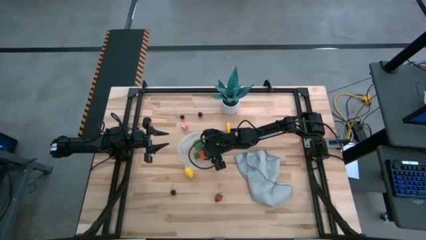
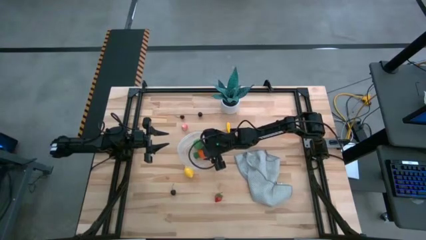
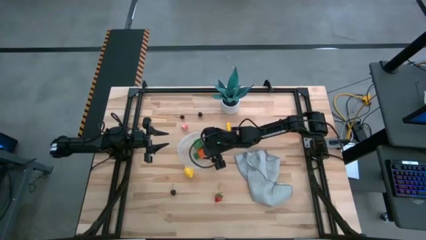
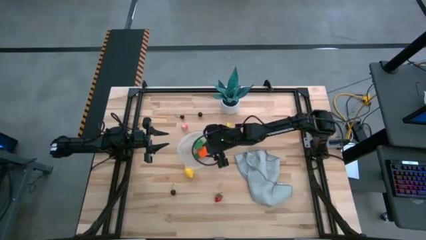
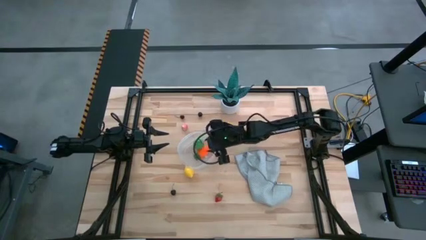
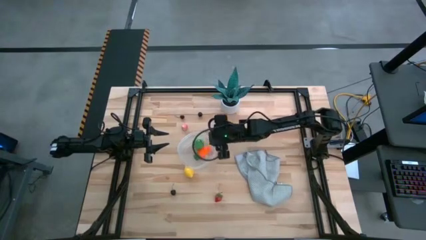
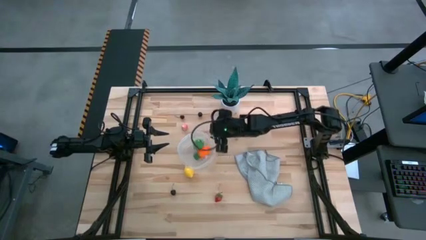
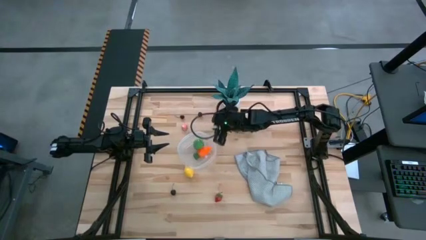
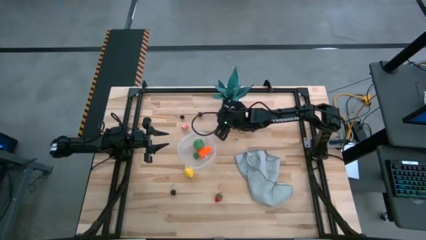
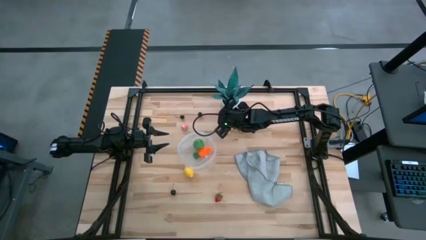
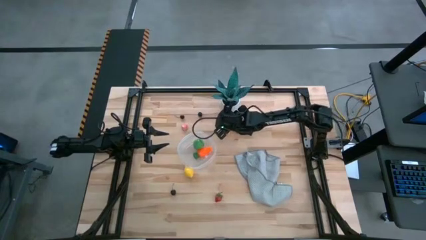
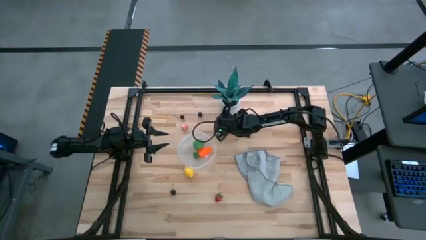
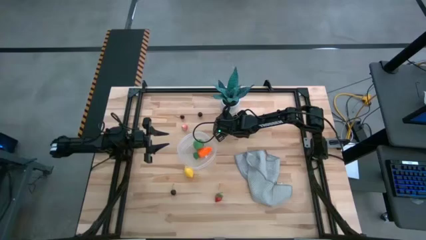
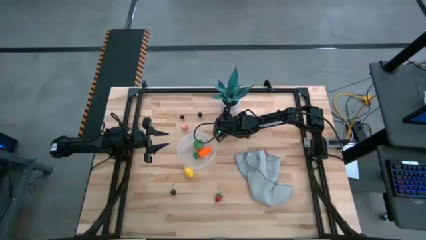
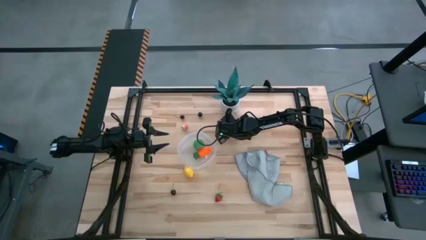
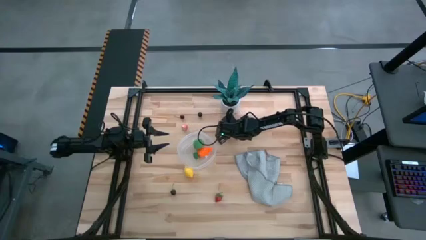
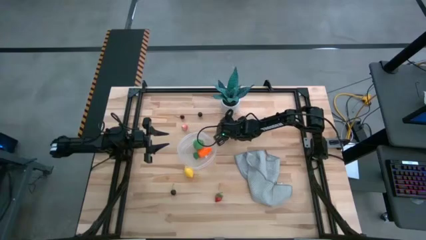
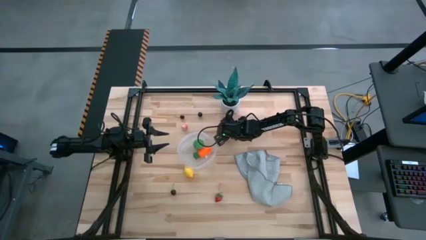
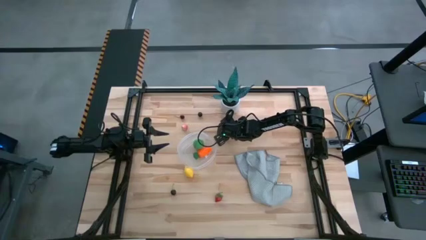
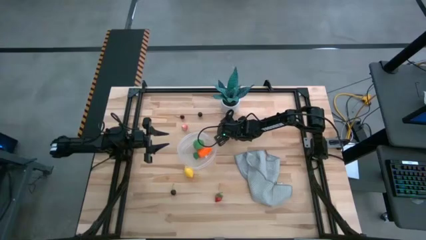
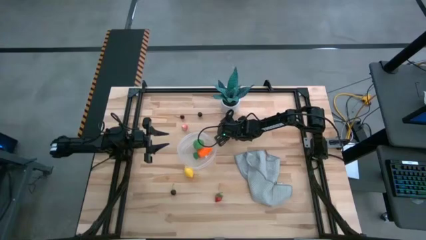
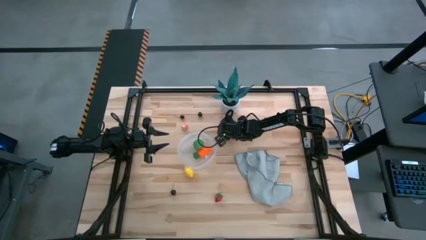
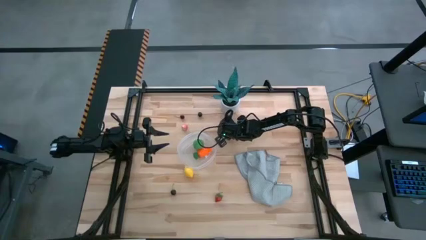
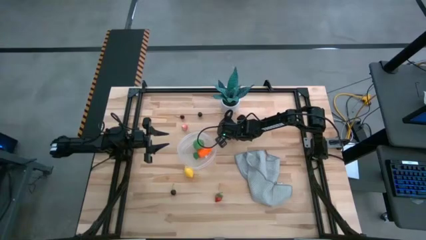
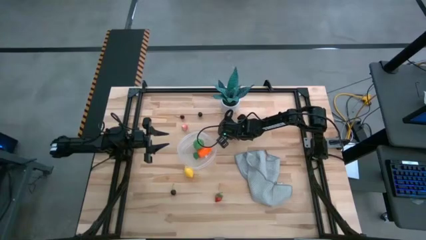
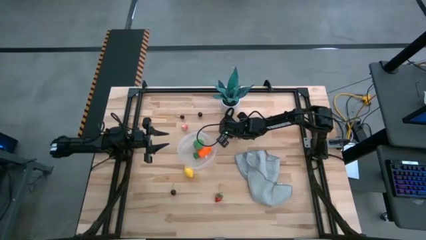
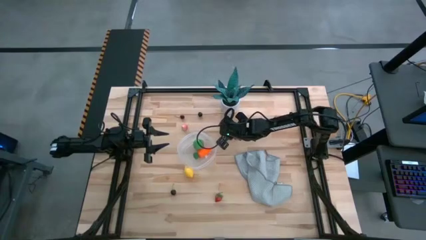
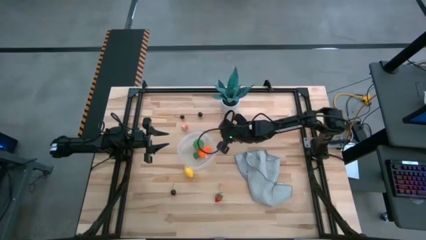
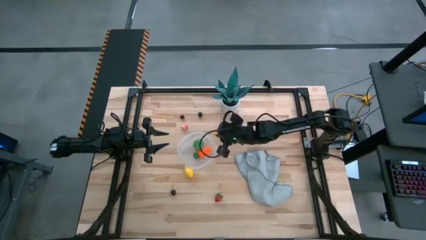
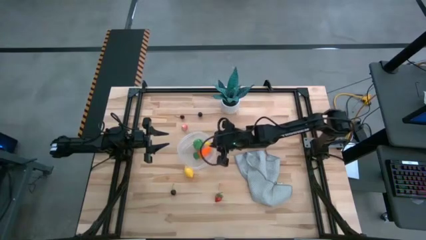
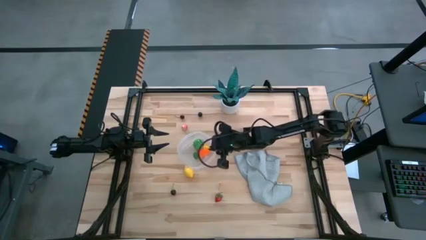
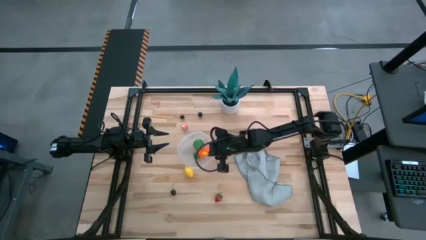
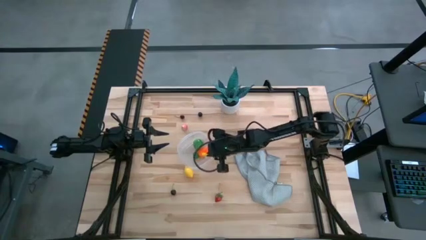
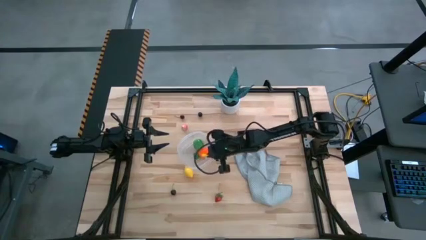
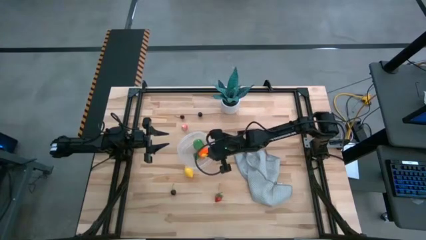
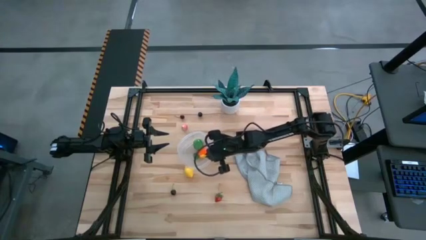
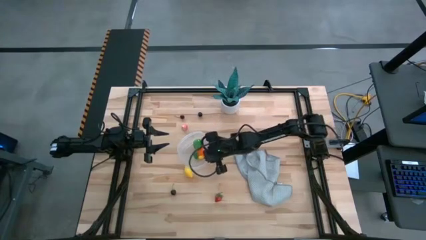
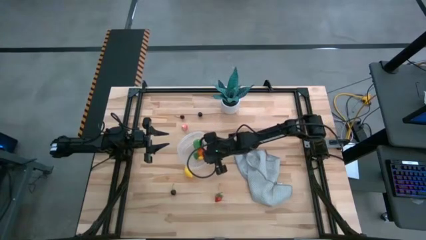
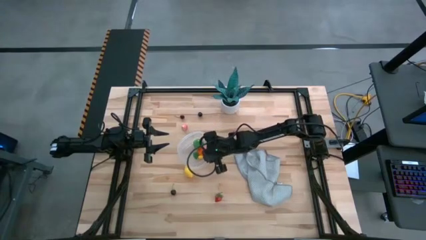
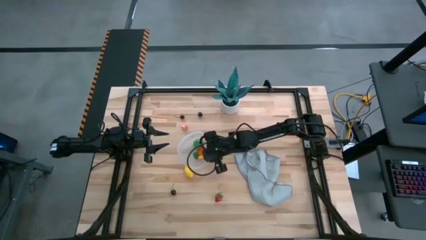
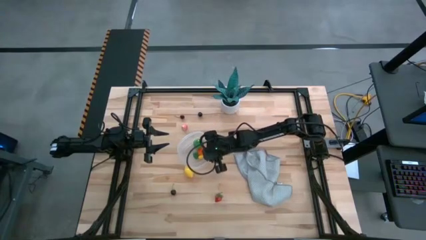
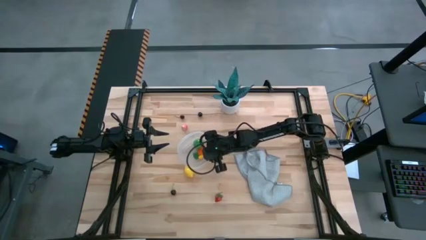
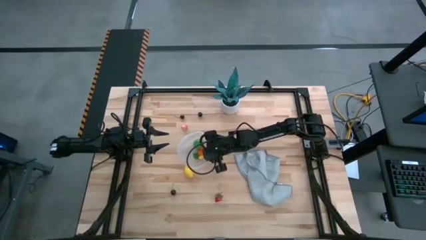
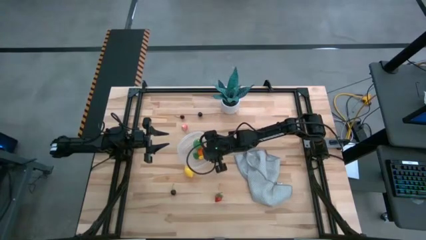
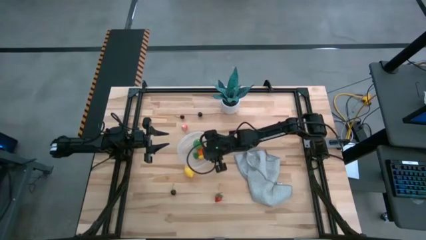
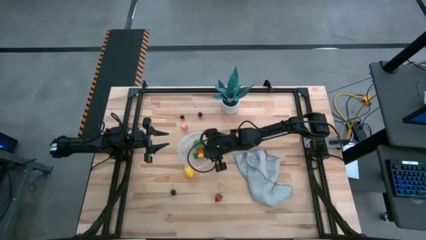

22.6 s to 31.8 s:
Task: Pick and placing Produce into tupperware
Put the yellow corn into the transparent bin

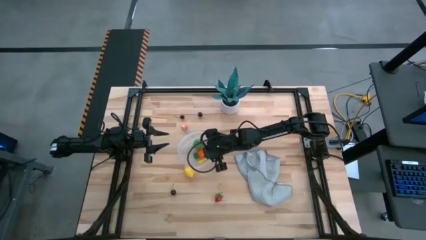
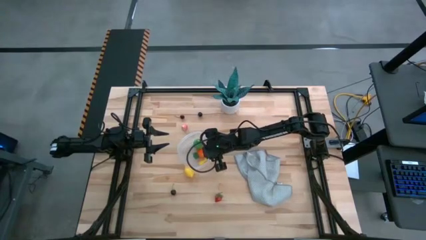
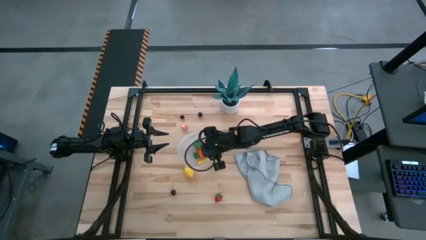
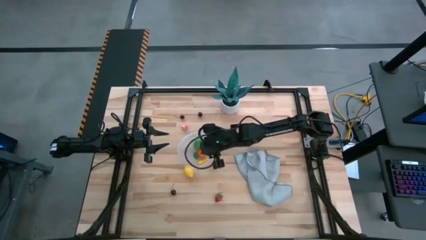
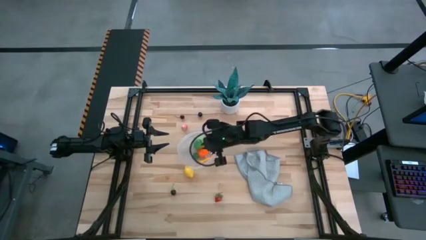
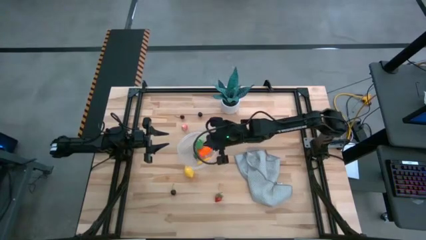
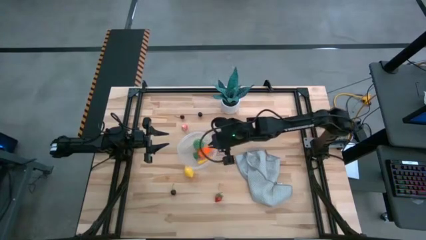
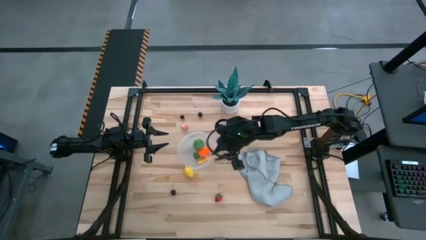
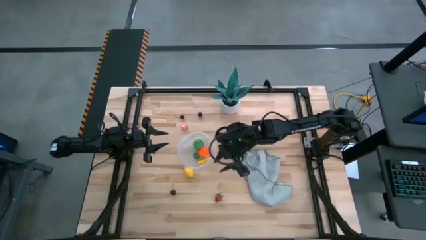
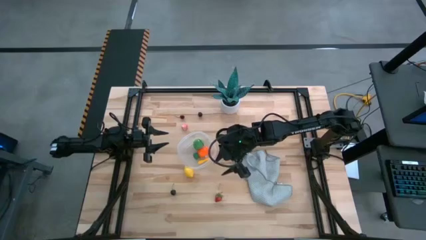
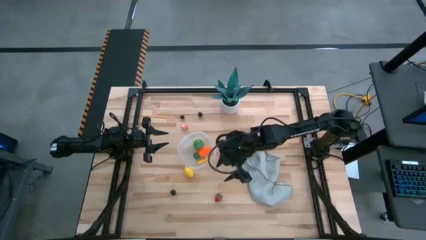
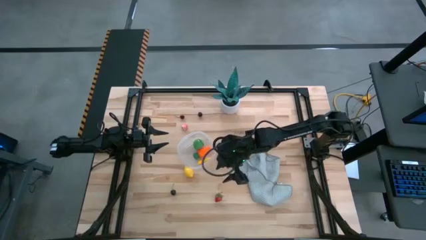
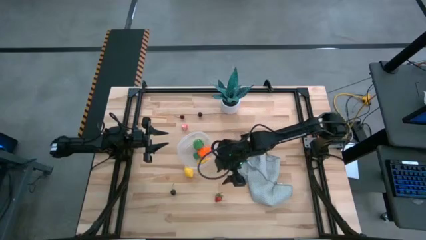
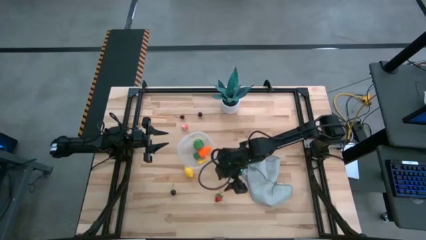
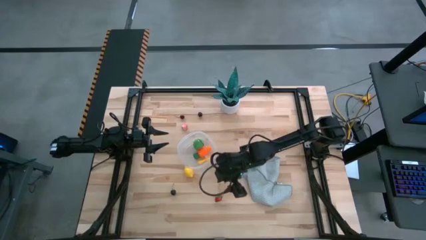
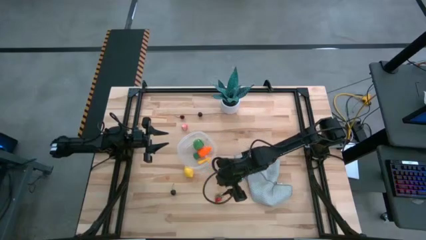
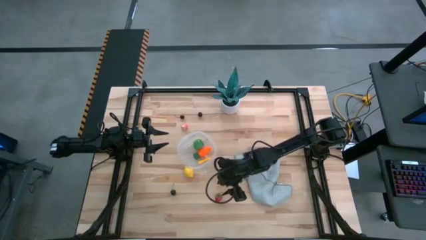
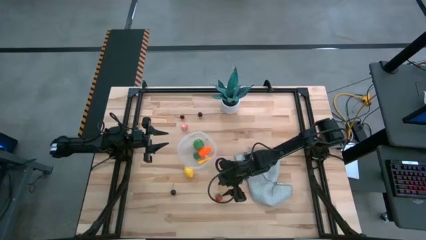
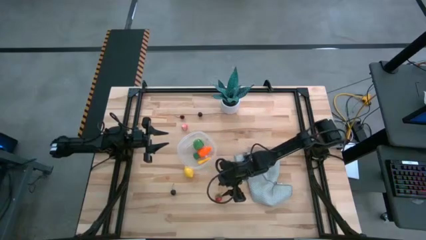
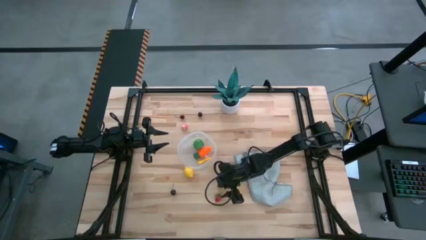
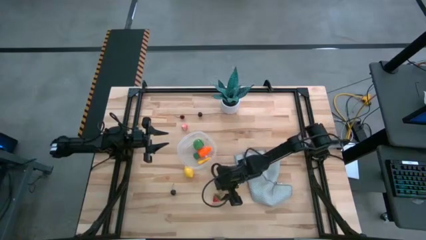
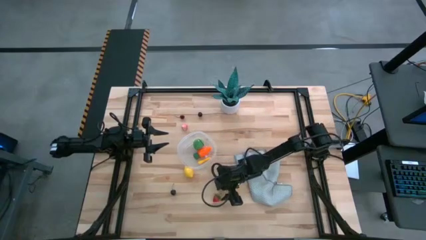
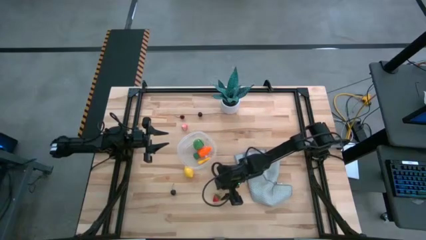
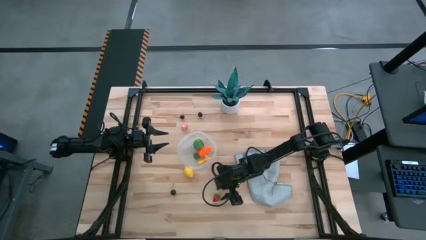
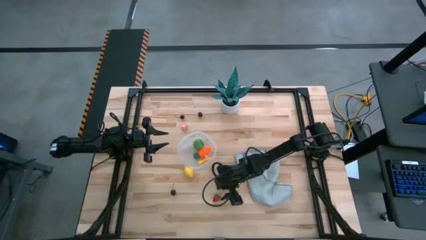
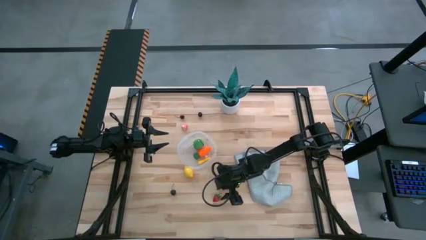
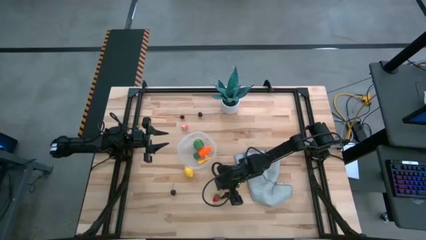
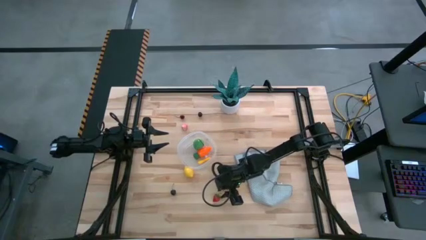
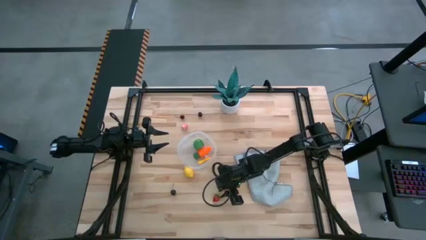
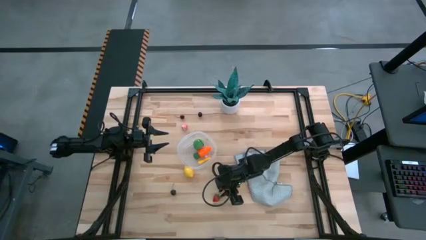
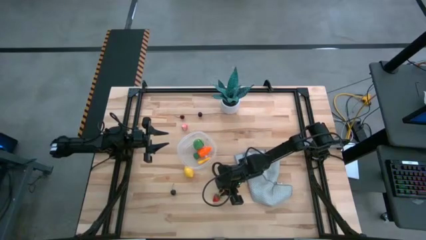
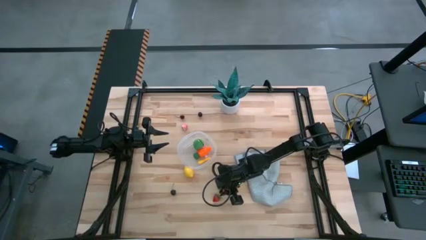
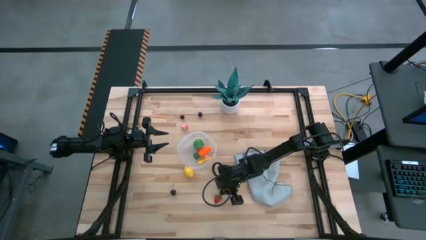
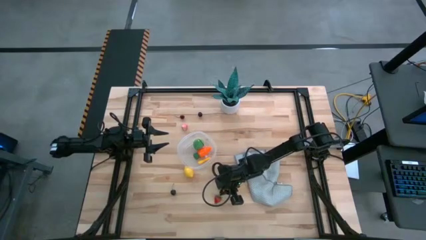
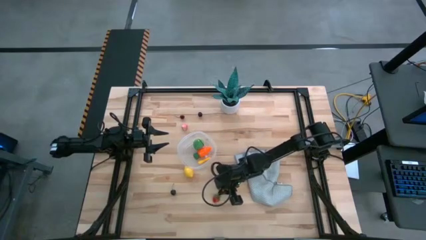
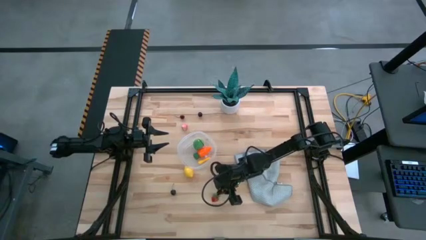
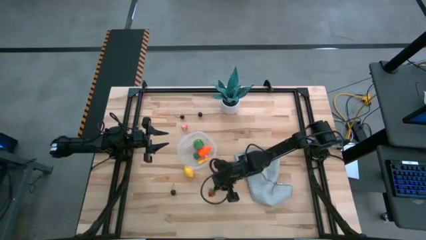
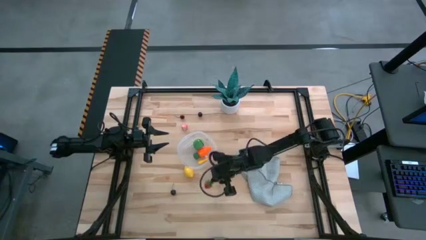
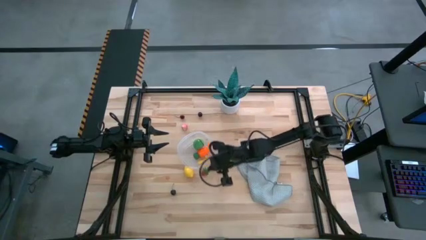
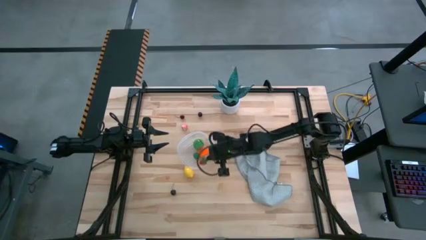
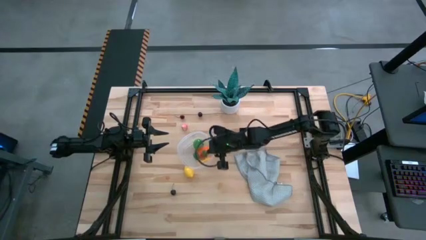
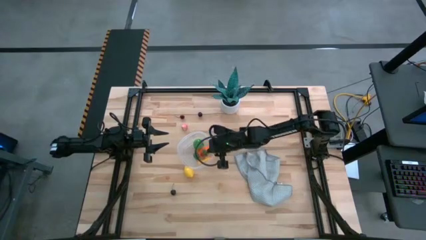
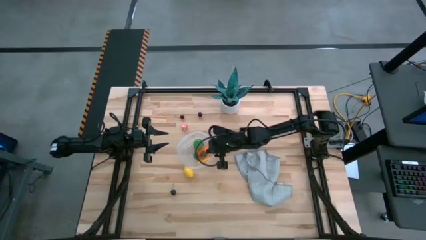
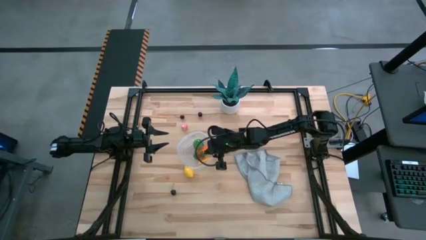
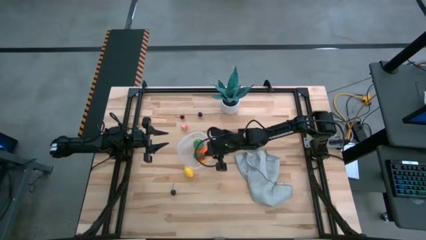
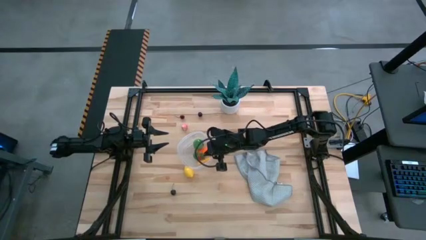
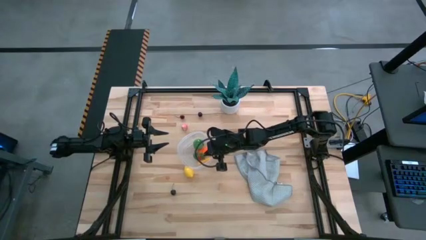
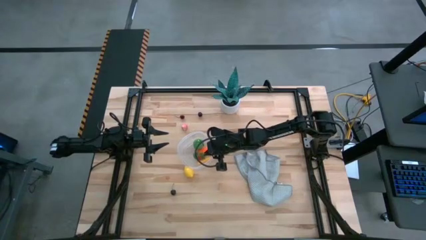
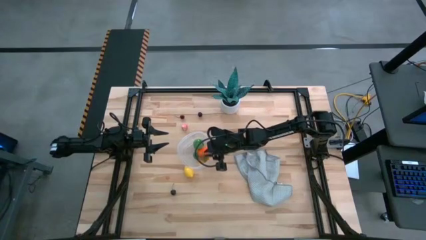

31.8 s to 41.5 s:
Put the red strawberry into the transparent bin
